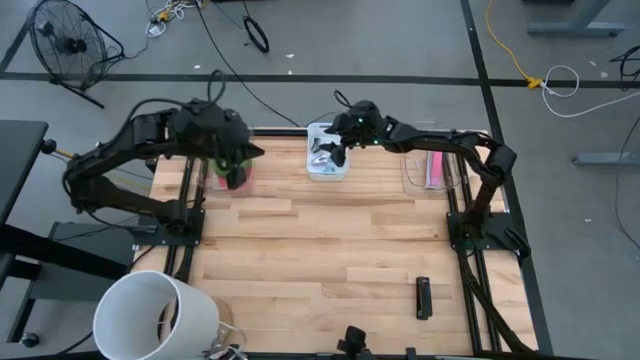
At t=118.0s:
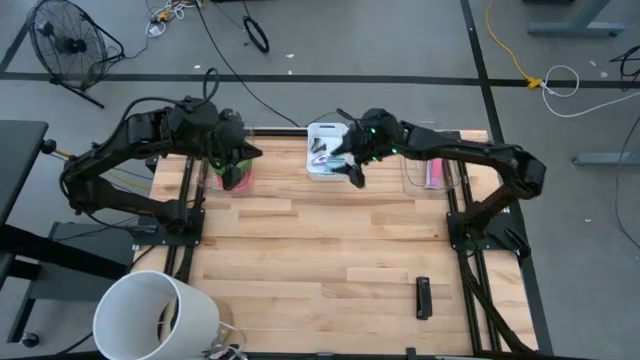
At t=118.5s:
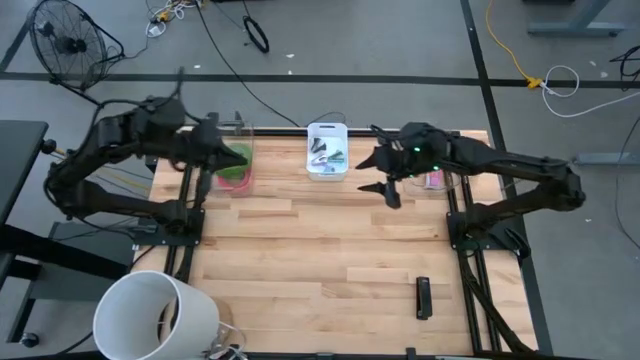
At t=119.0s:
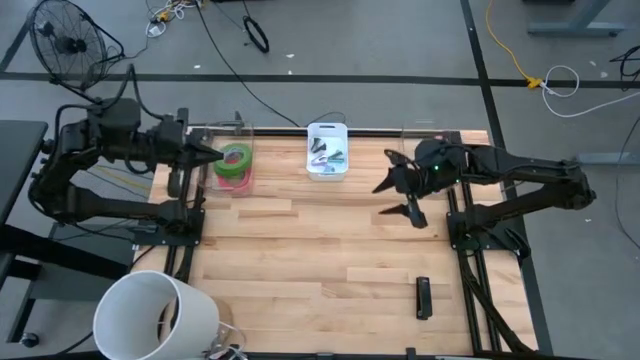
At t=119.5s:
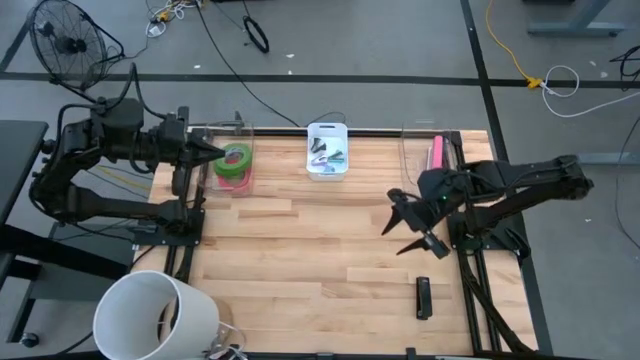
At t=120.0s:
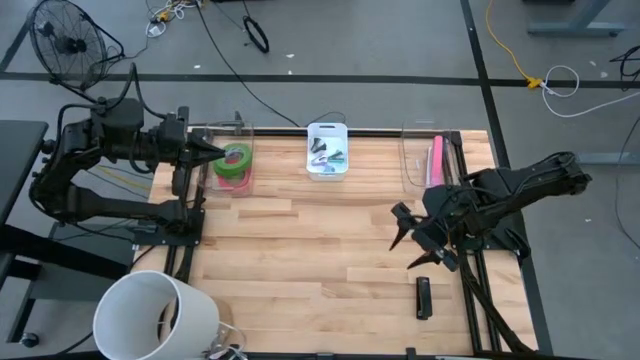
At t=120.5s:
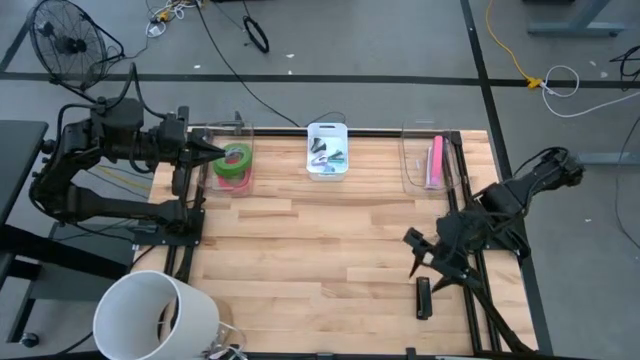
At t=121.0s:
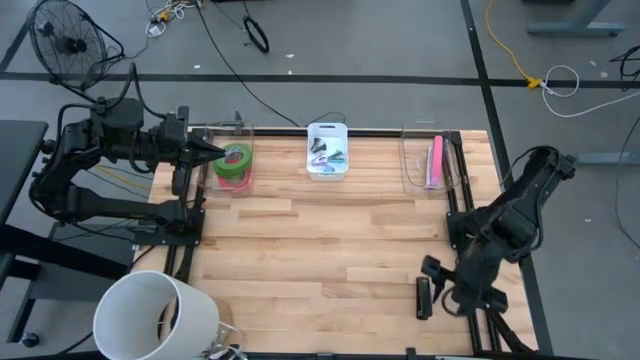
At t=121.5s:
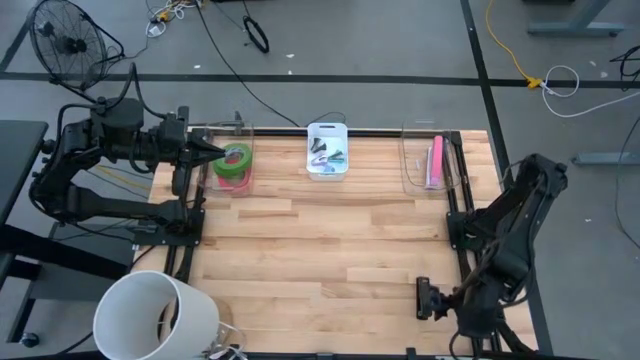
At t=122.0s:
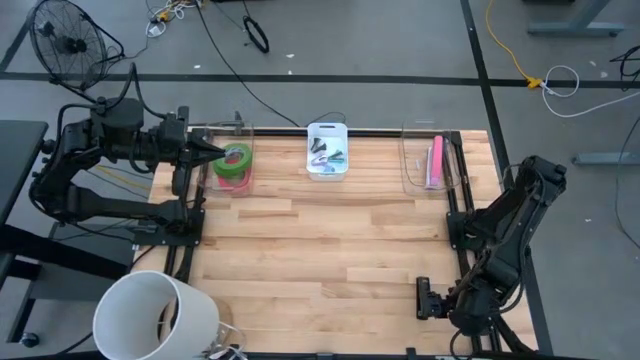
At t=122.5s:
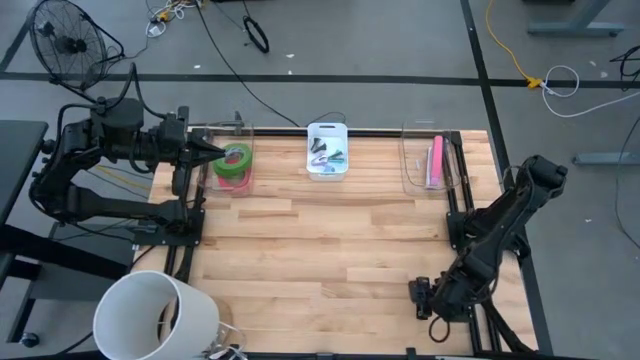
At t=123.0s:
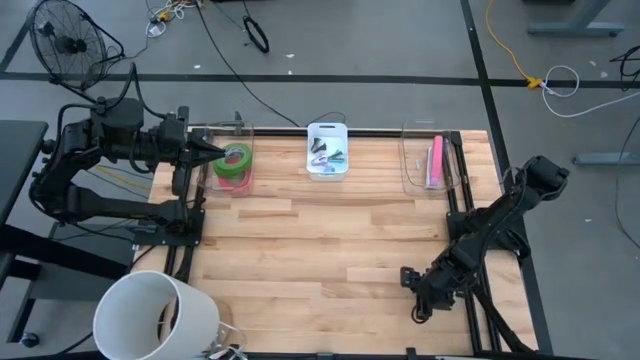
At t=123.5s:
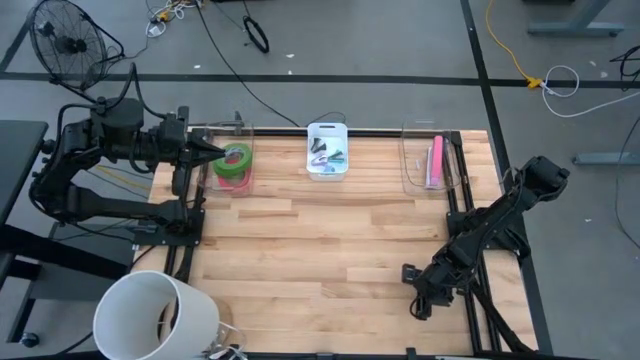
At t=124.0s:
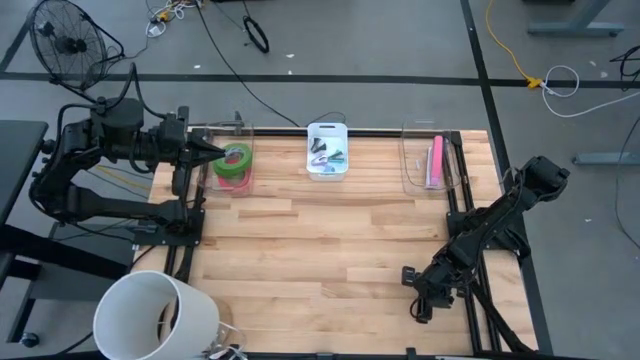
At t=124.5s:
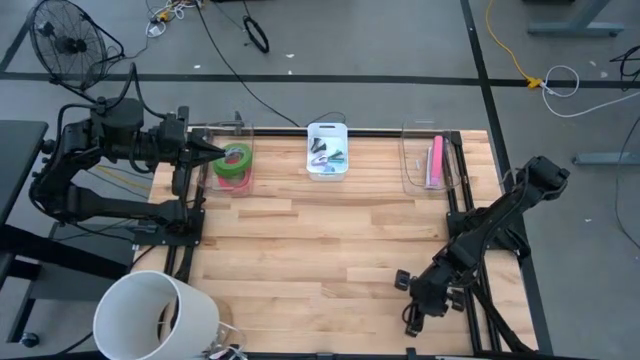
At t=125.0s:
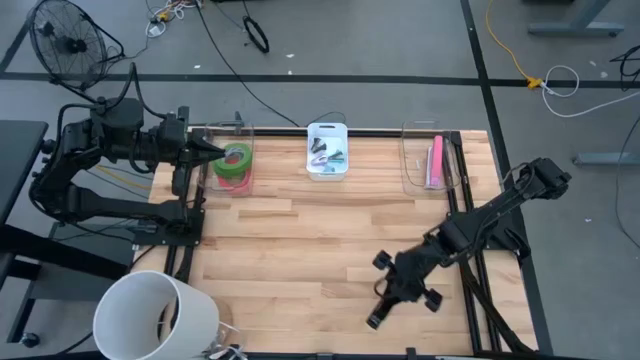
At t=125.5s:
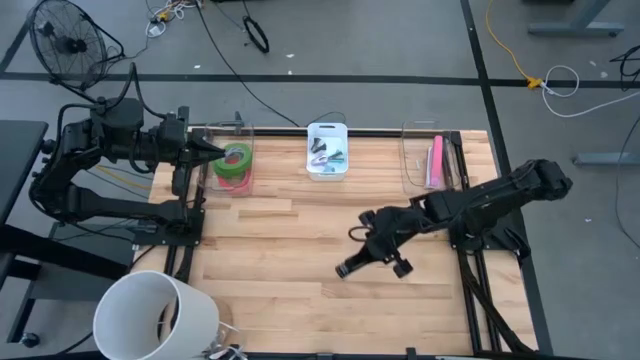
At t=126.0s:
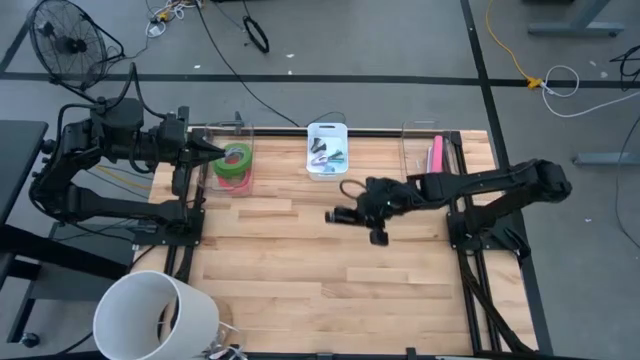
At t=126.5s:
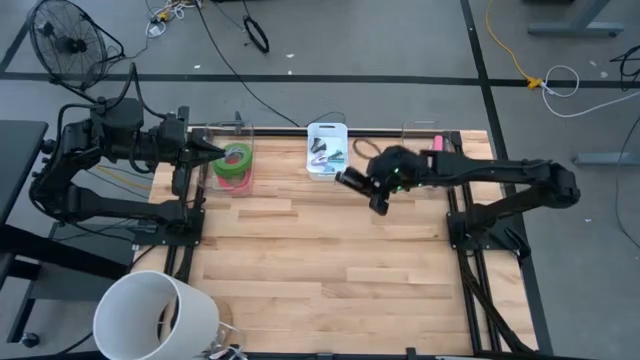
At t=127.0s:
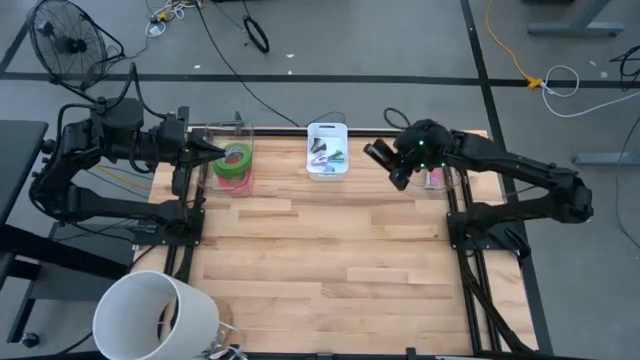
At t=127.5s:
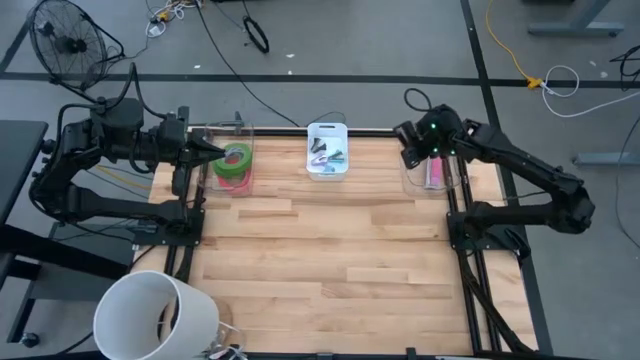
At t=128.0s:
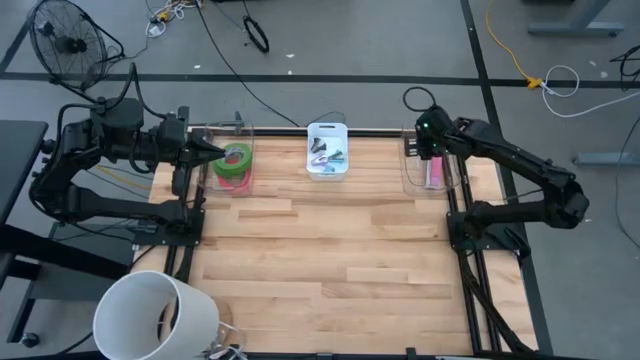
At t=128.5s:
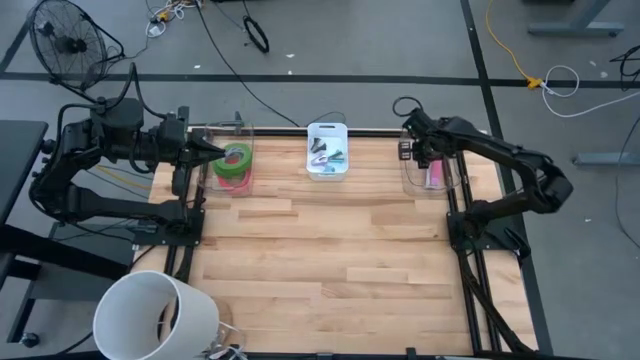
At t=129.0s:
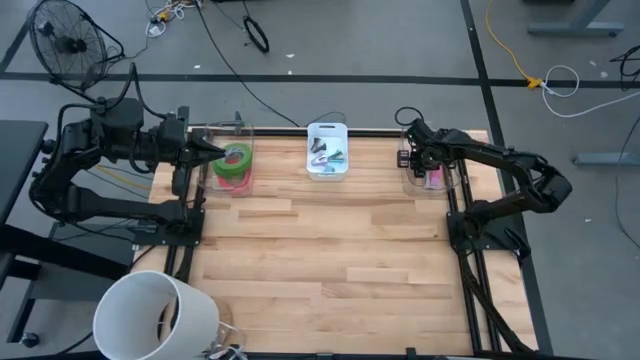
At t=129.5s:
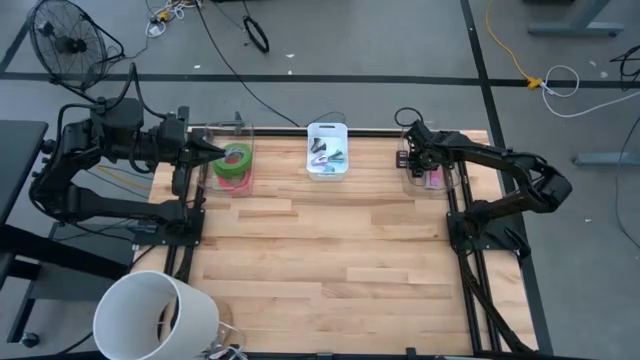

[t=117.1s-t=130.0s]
Task: Pick and place Stapler, Stapler remover, tape
Put the black stapler into the right transparent bin

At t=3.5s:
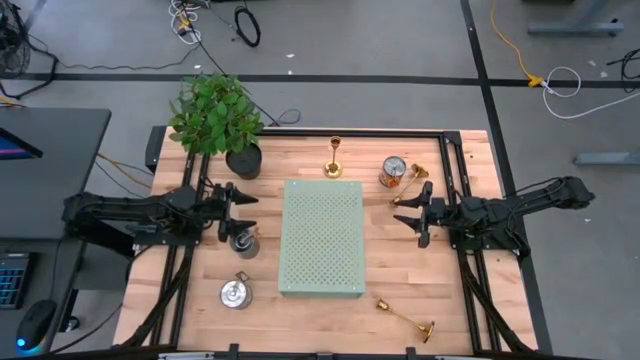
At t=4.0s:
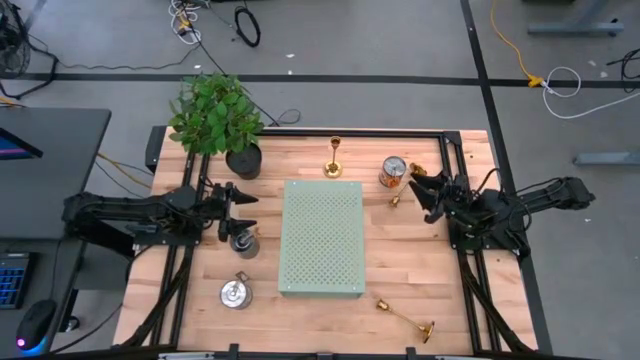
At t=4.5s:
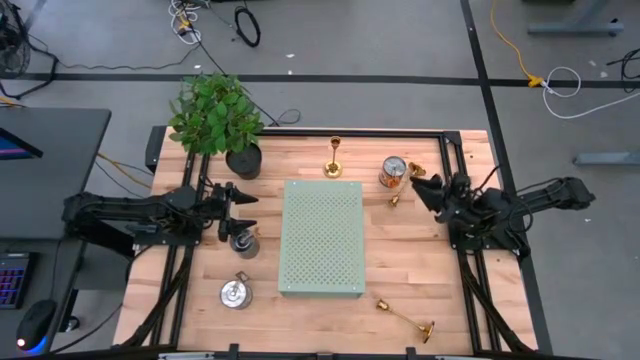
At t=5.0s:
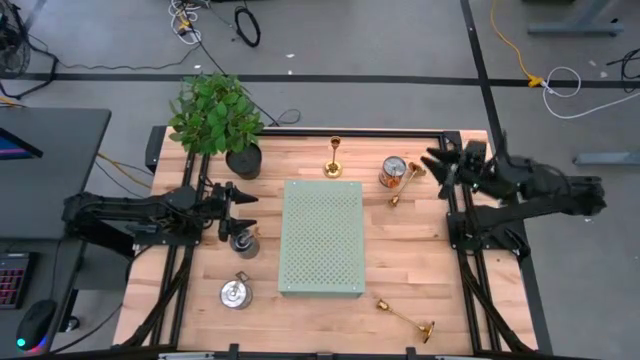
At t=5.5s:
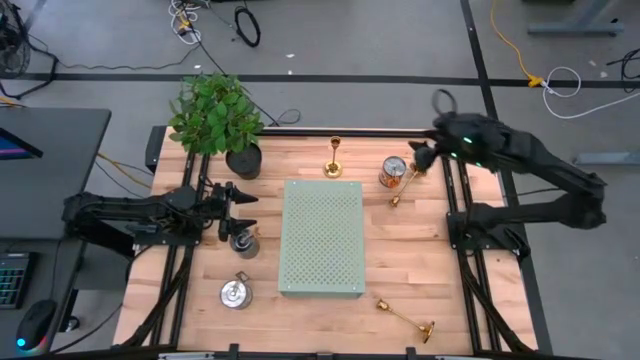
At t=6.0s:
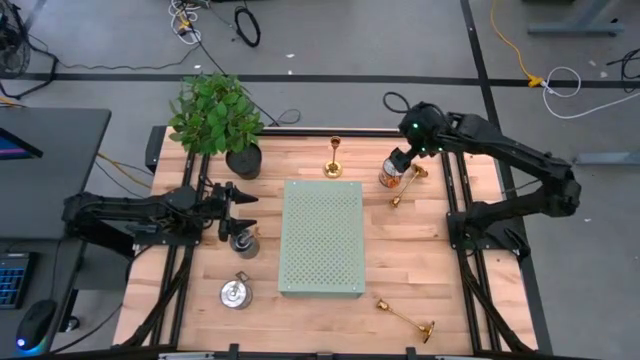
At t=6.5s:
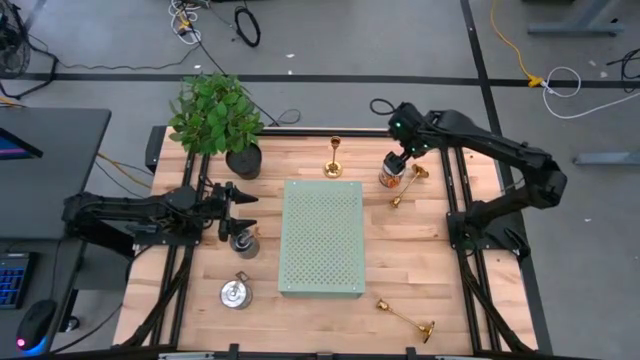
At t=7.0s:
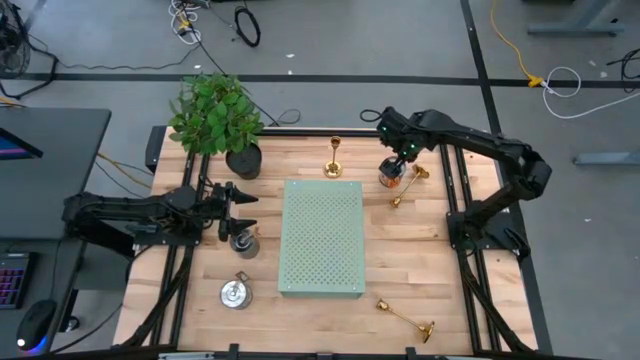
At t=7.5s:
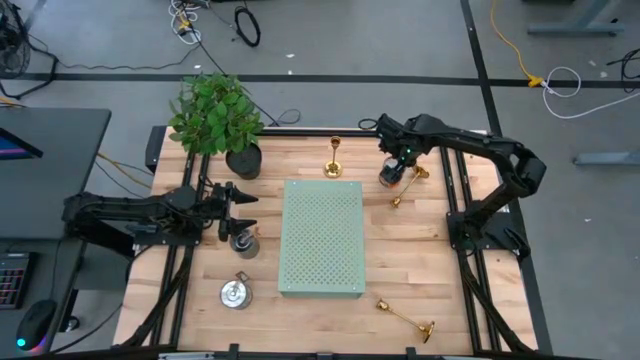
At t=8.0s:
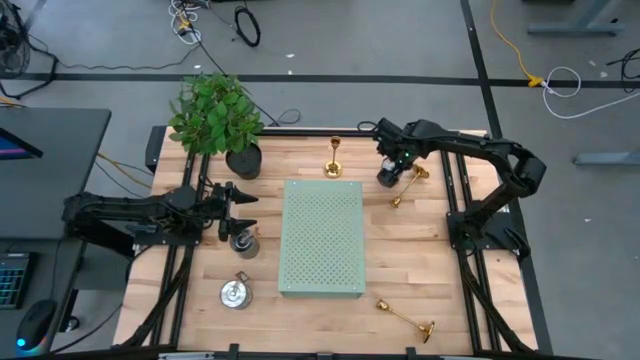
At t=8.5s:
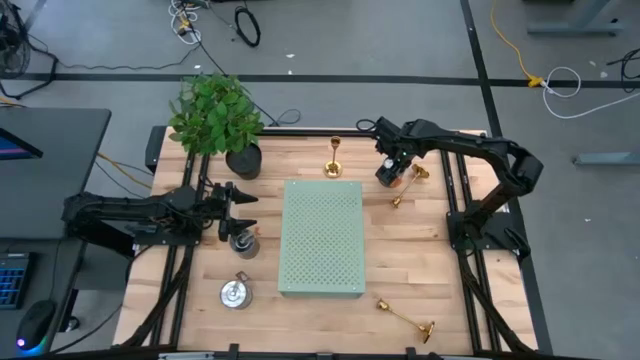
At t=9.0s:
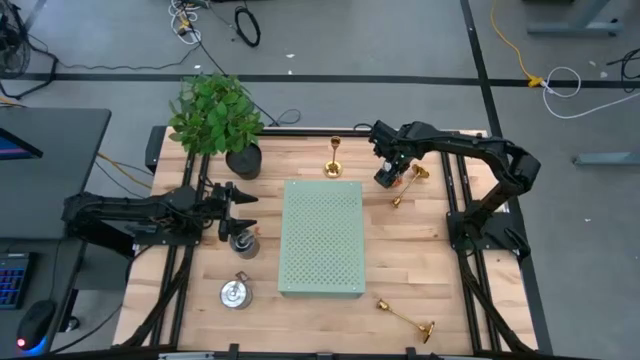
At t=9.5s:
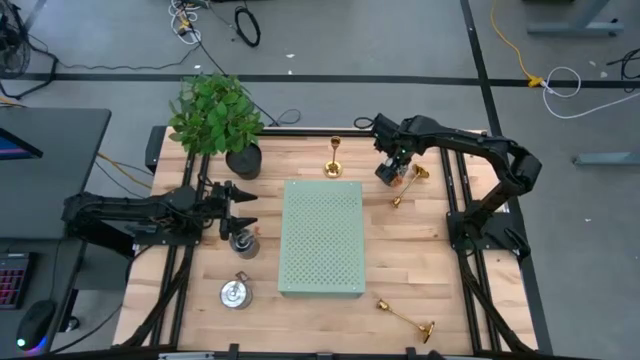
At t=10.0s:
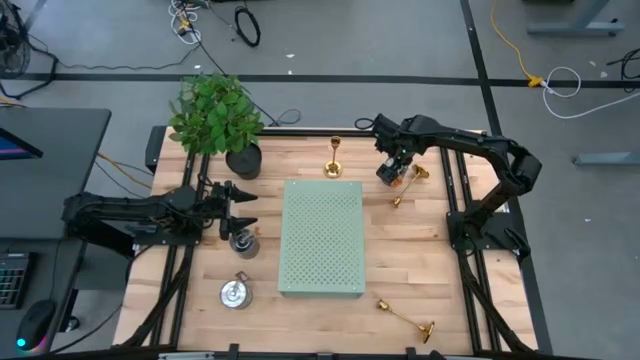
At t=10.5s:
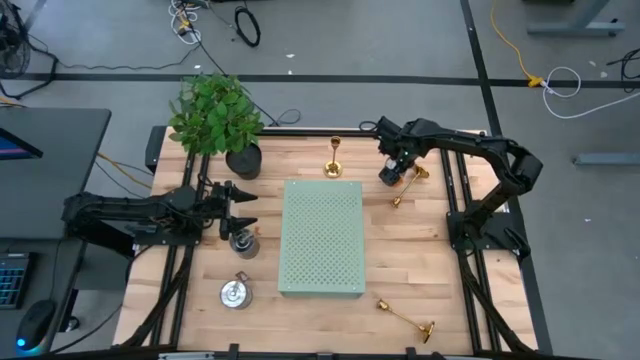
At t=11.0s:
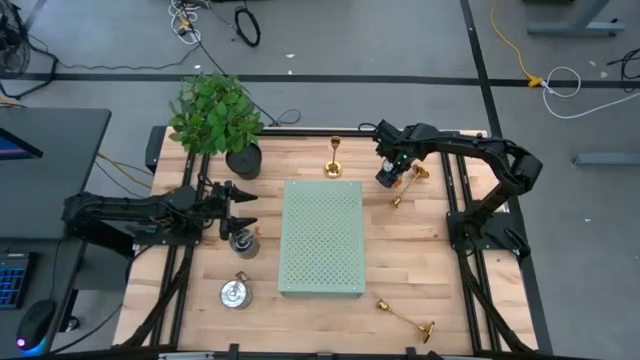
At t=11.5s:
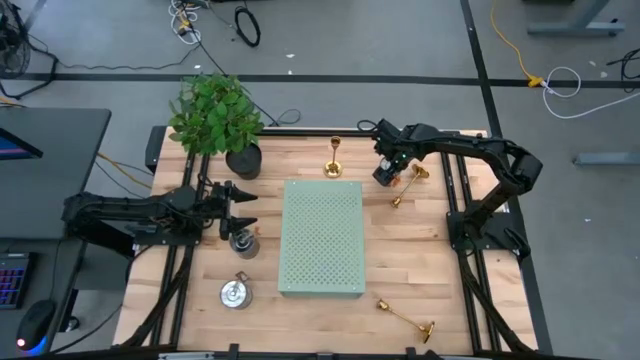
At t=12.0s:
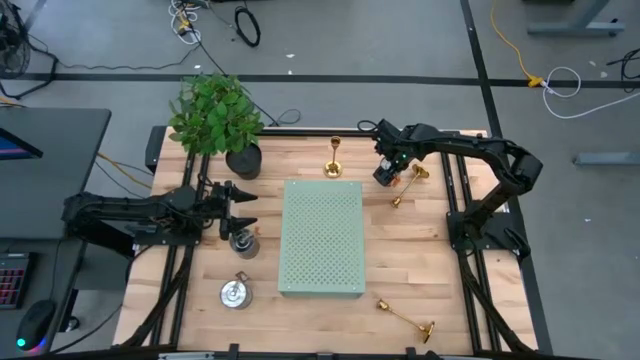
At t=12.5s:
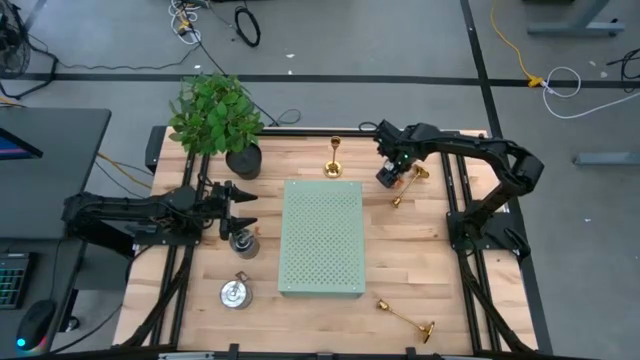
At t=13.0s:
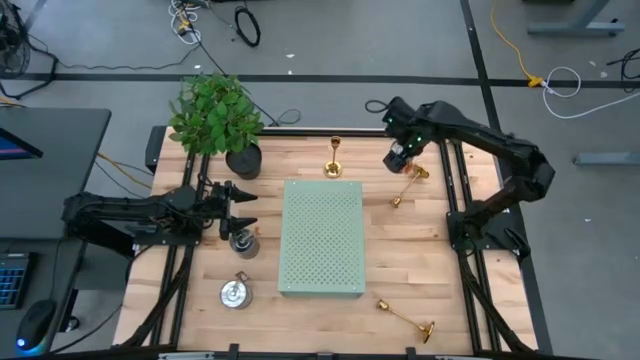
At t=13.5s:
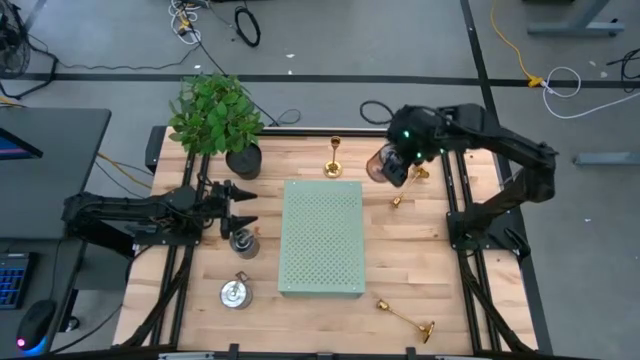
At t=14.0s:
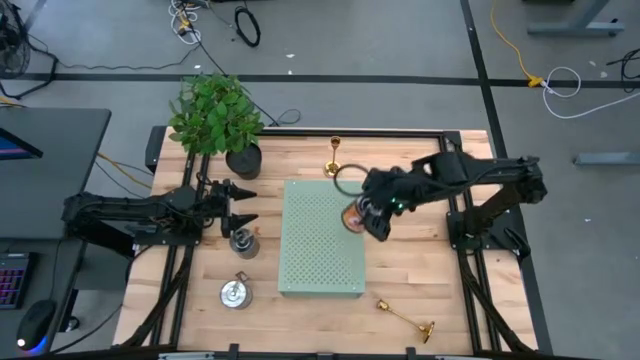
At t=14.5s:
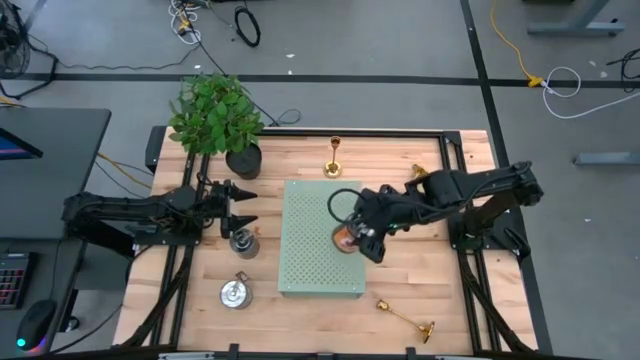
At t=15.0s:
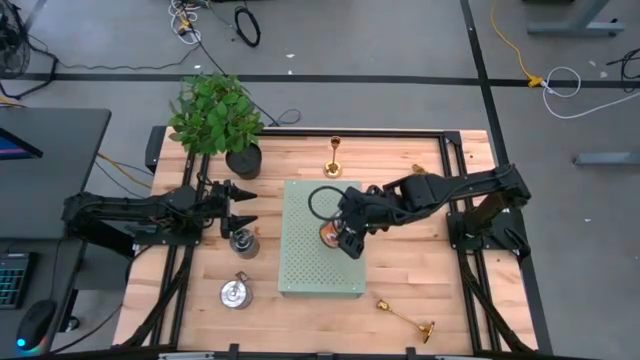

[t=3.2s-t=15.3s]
Task: Pick & Place candle stick holders
Put the top orange scented candle on the shelf
